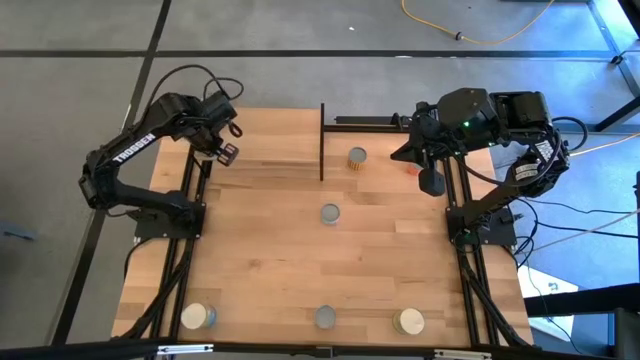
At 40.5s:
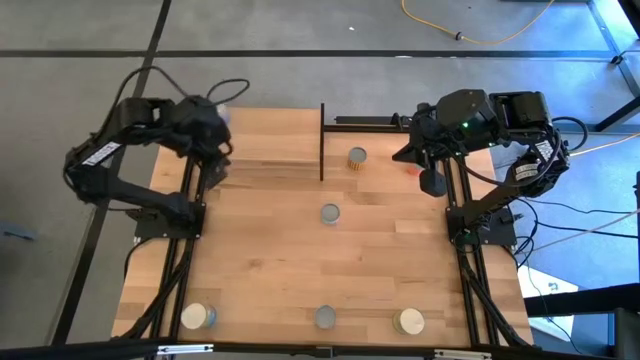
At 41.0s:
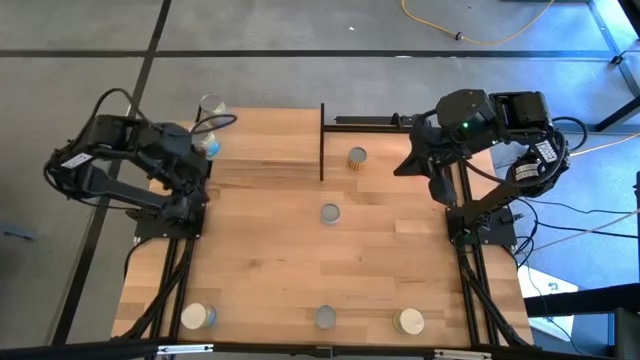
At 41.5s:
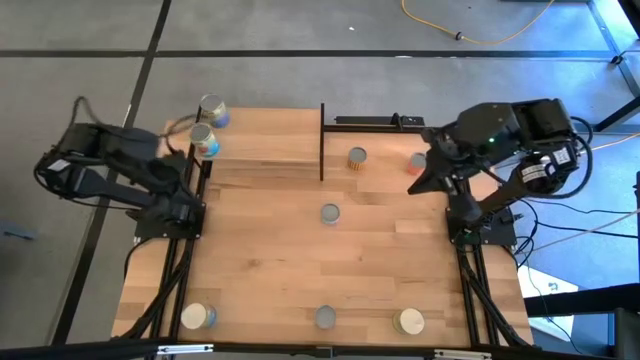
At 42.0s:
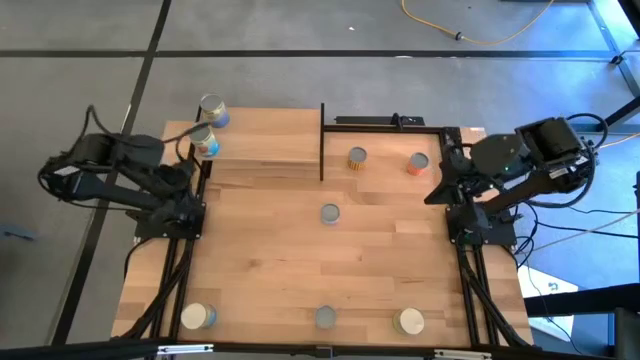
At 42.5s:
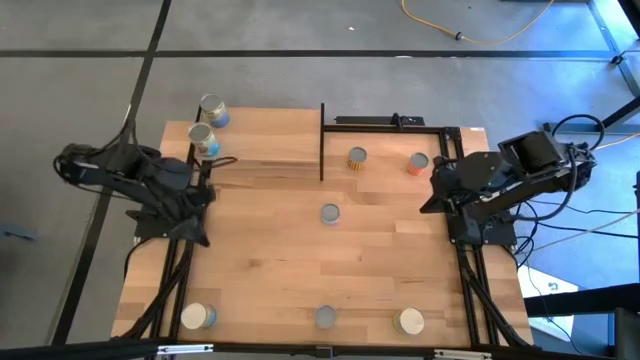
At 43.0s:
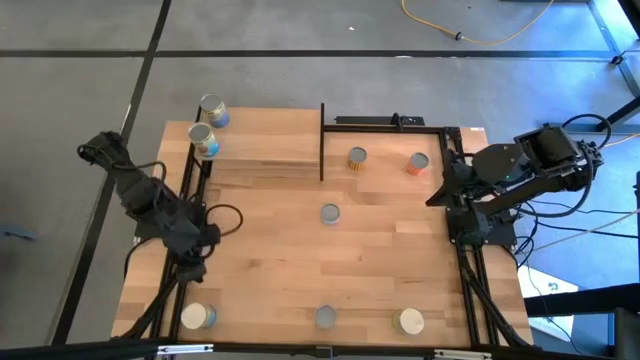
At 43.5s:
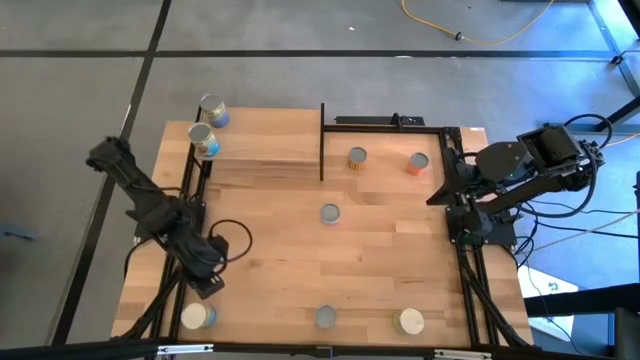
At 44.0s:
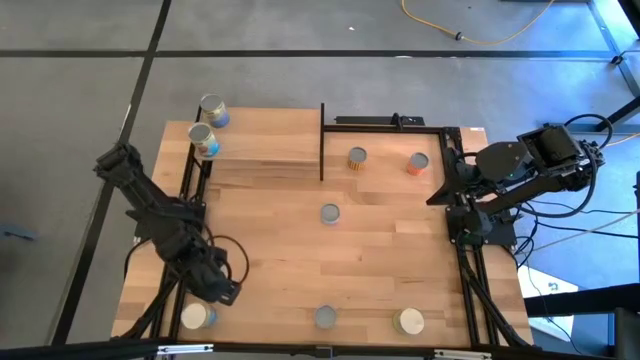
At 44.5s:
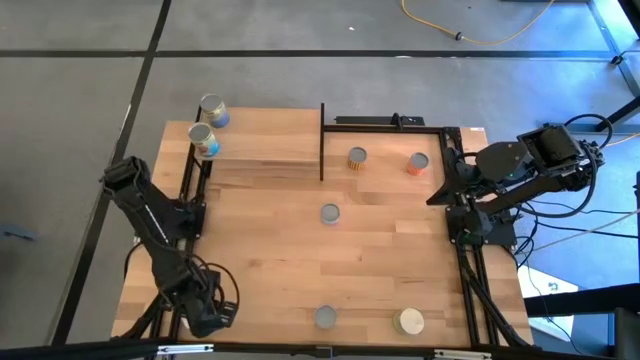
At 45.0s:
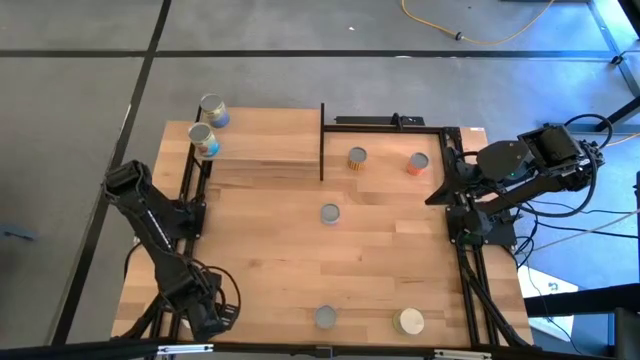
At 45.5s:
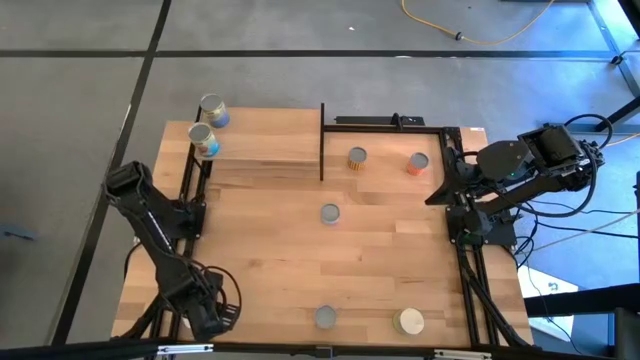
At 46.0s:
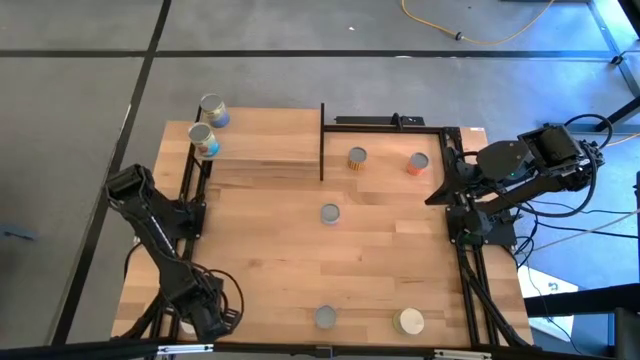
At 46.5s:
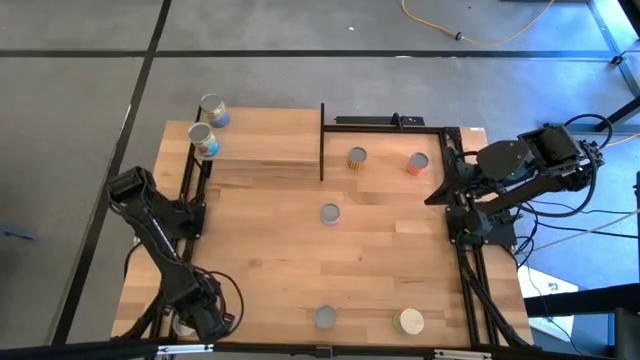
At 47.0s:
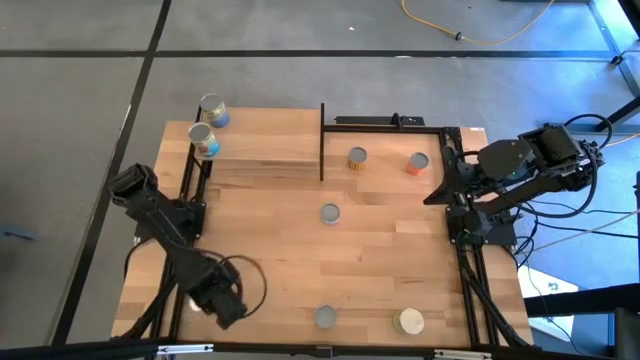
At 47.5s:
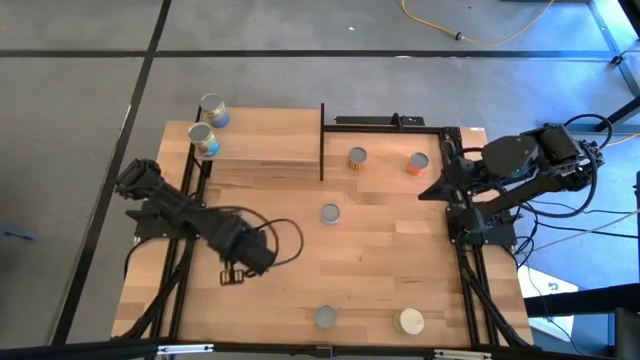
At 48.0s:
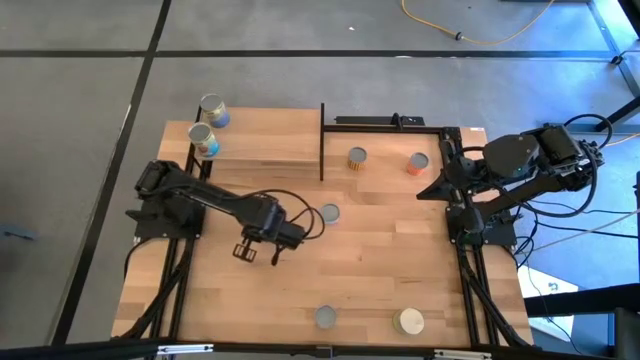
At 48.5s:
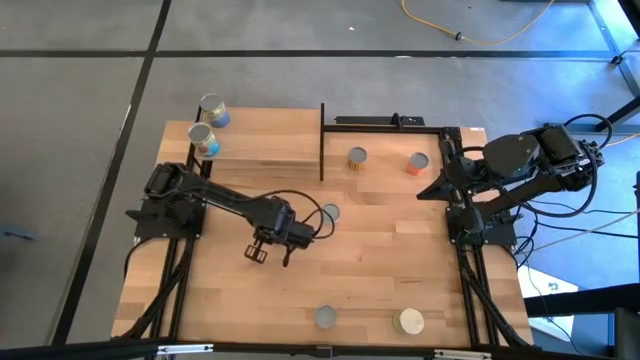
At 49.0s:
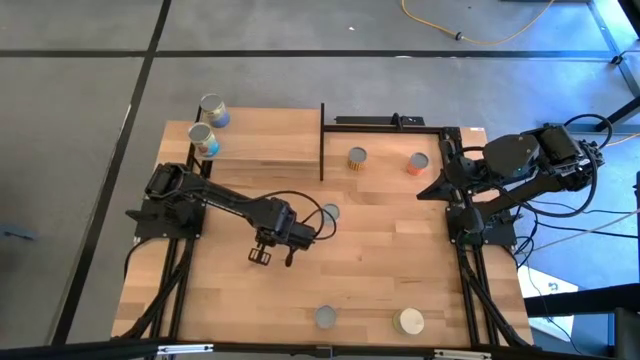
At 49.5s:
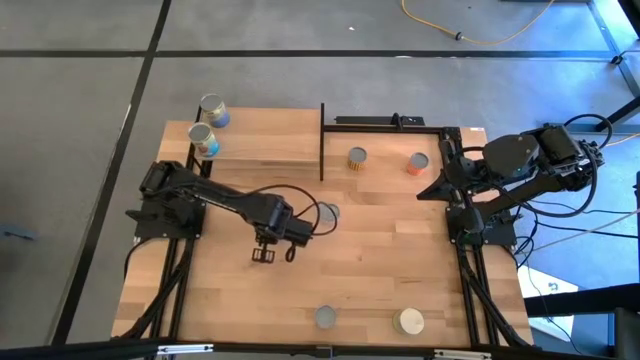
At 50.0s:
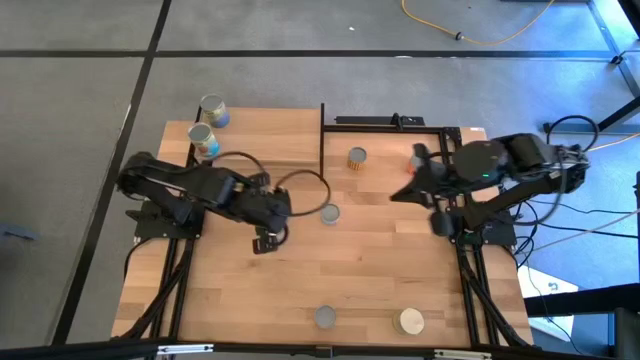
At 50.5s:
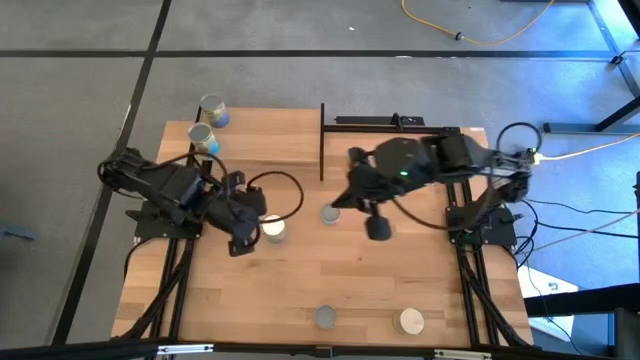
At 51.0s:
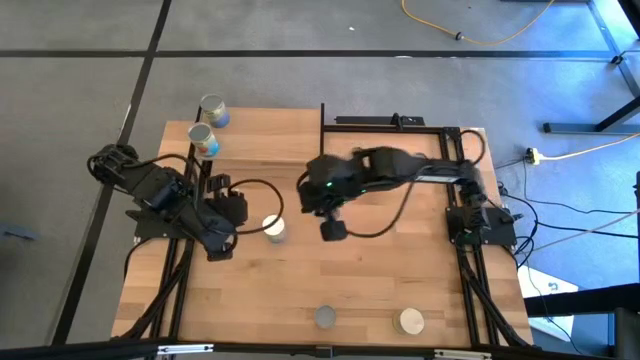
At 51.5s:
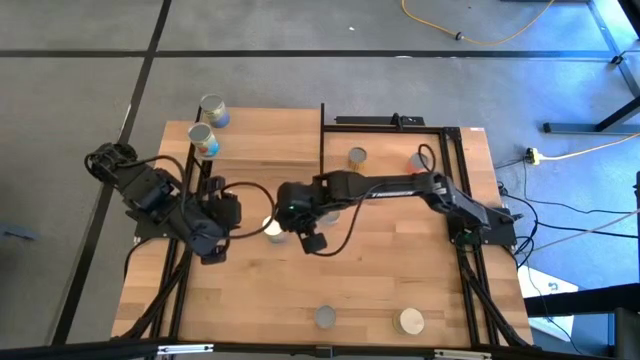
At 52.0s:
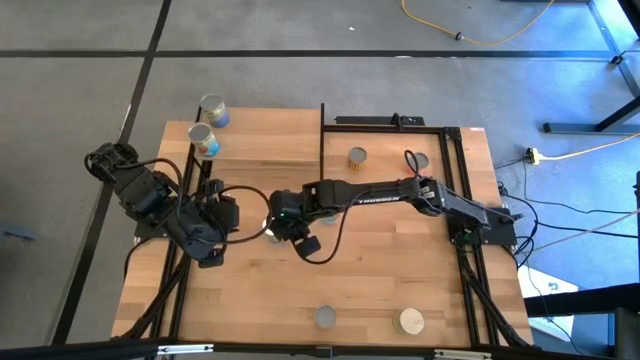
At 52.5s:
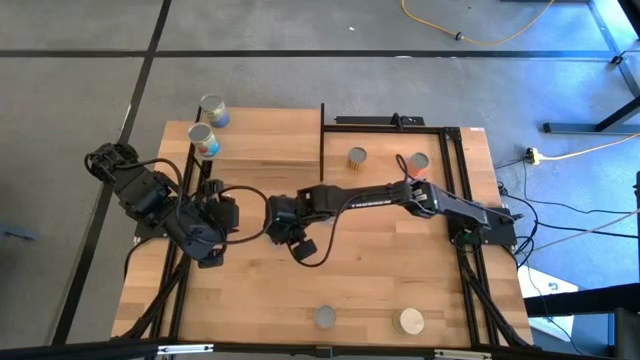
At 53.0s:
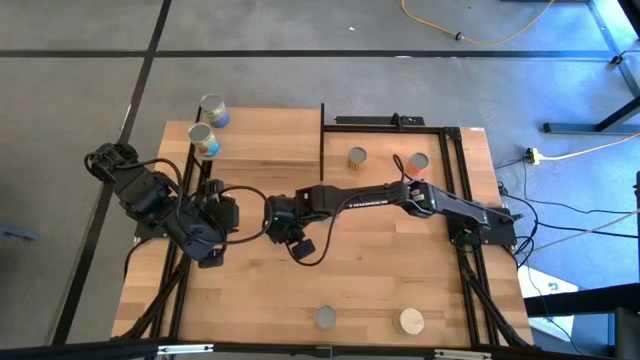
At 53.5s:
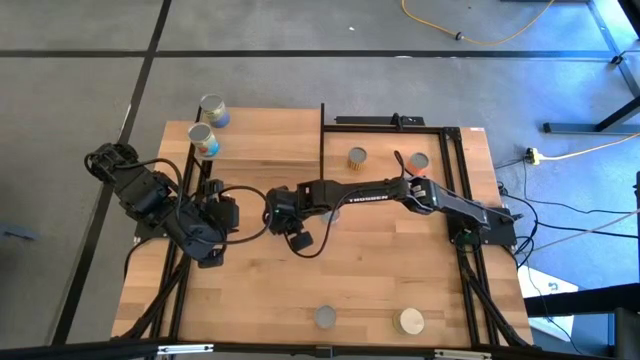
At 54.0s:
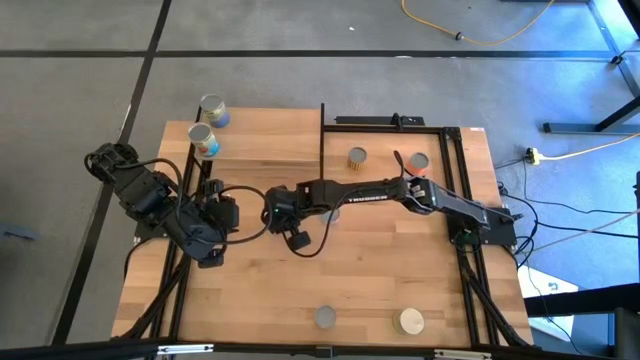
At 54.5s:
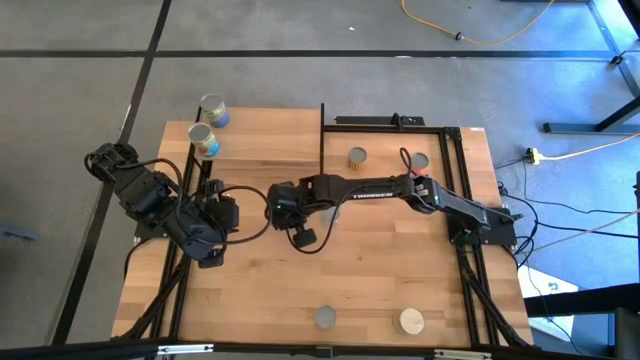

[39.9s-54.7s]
Task: Pick and place cans onto a shelf
Put the blue canned tomatoes on the shelf

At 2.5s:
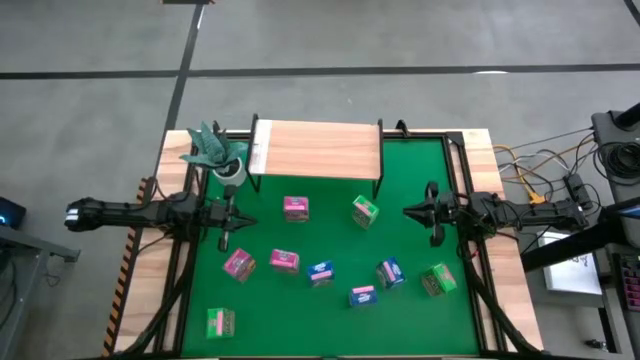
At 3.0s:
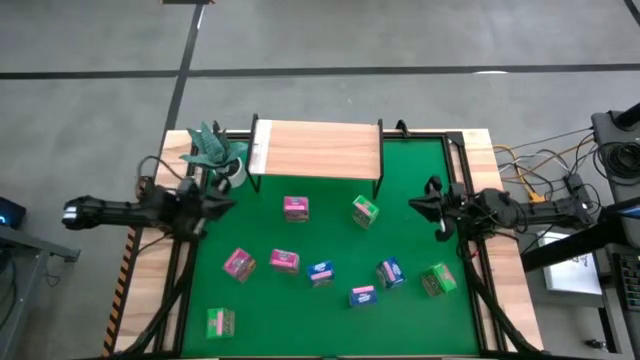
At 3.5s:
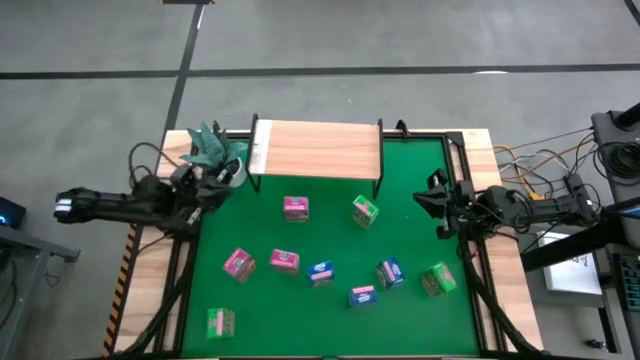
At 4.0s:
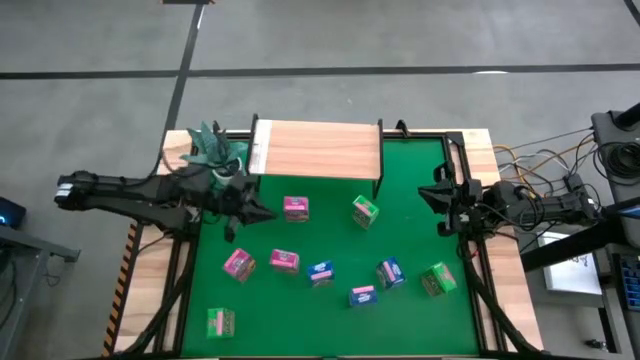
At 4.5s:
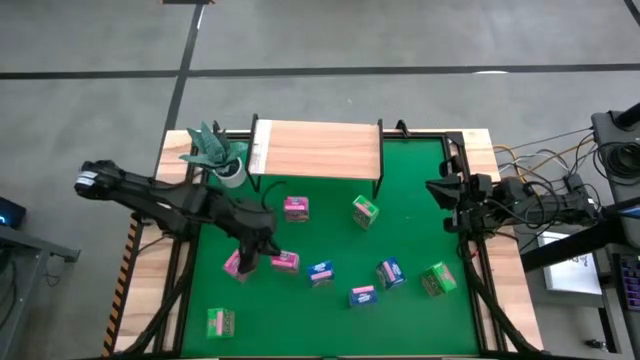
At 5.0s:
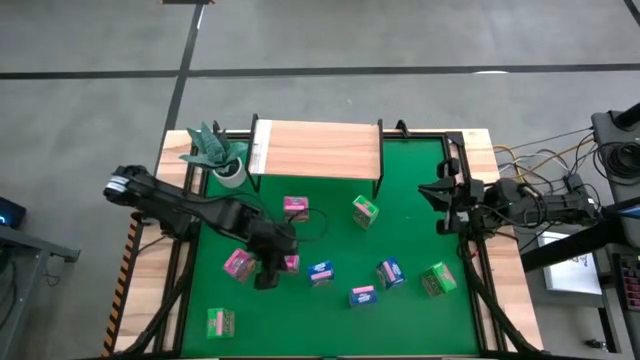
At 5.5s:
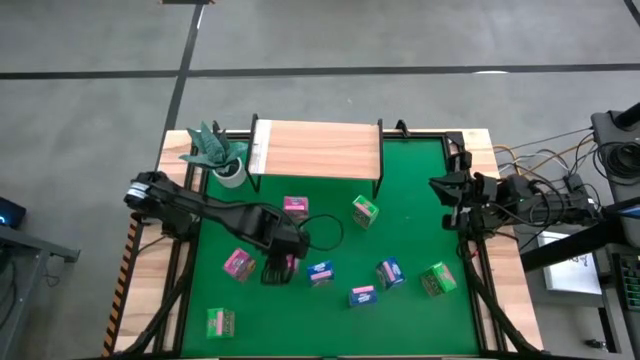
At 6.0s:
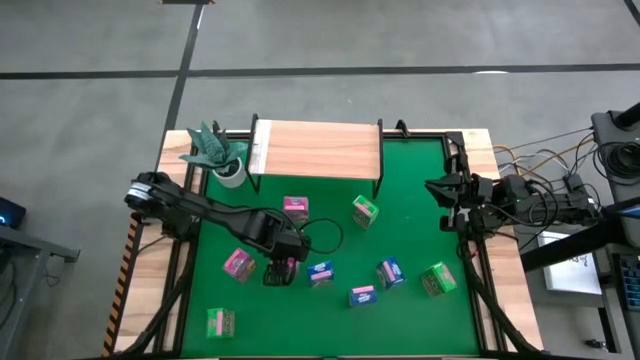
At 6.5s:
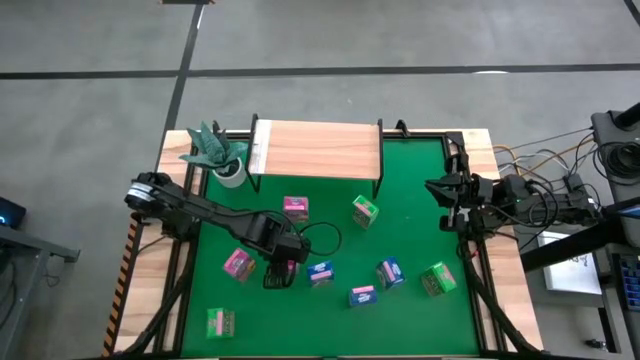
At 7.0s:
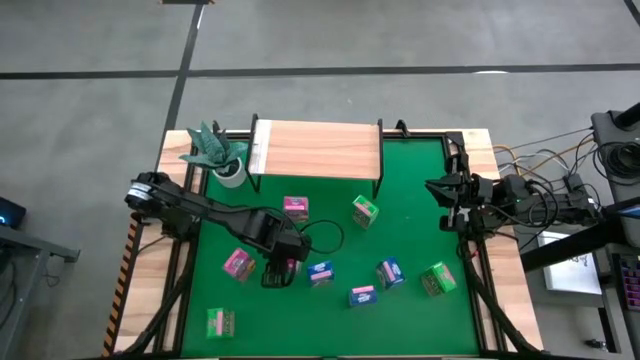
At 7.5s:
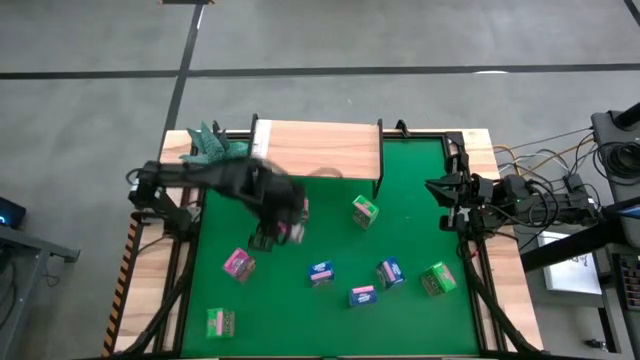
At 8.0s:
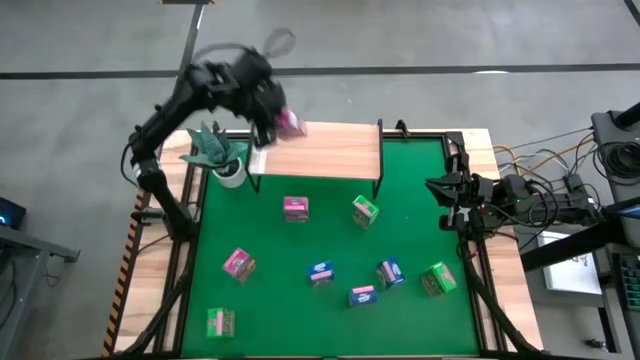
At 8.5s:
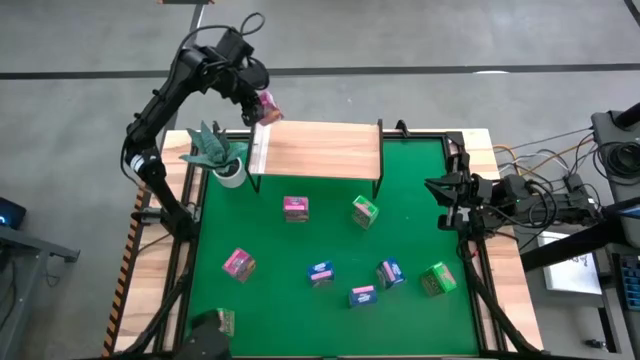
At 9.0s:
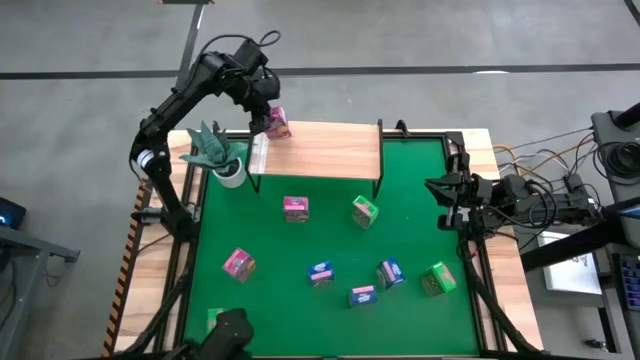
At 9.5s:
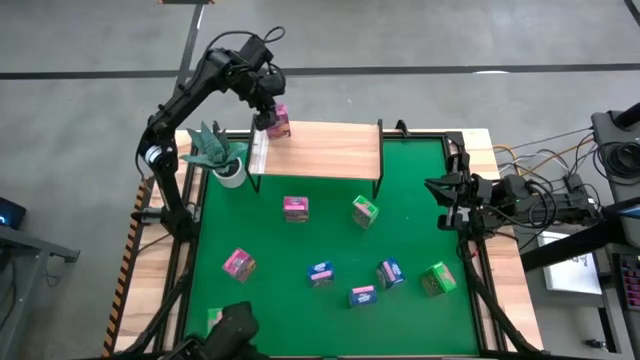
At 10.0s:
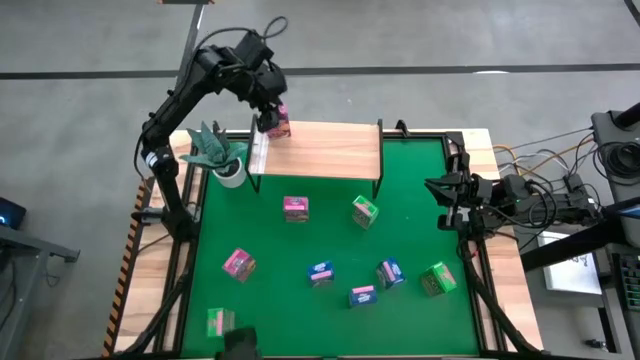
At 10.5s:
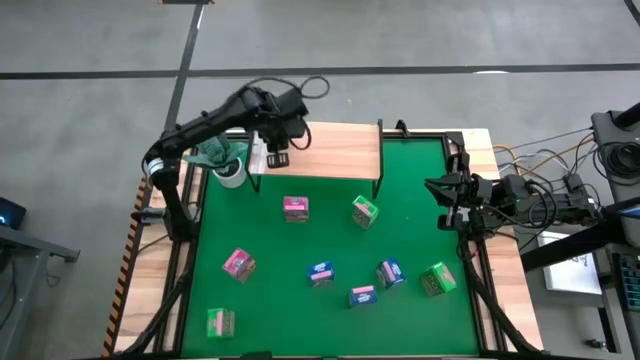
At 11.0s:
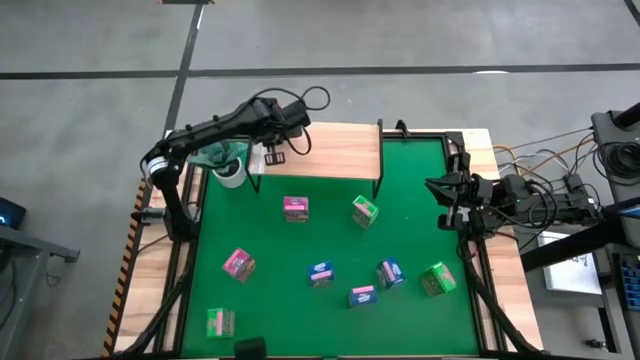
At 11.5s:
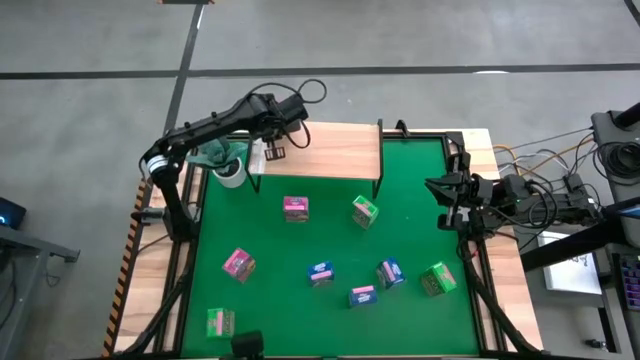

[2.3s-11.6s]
Task: Stack cereal on shelf
Put the bottom right pink cereal box on the shelf
